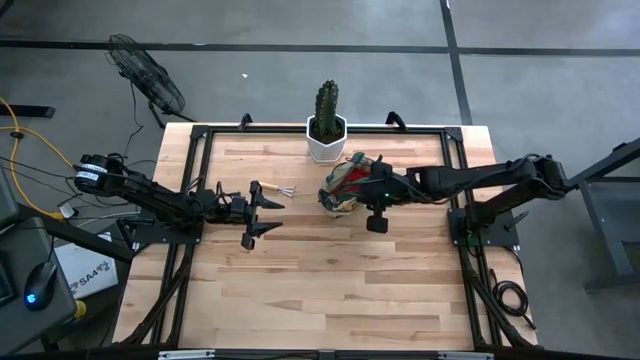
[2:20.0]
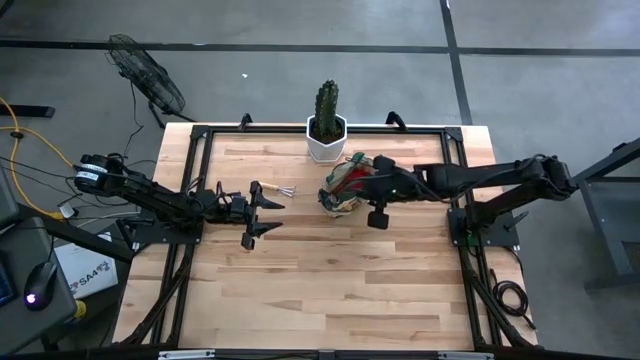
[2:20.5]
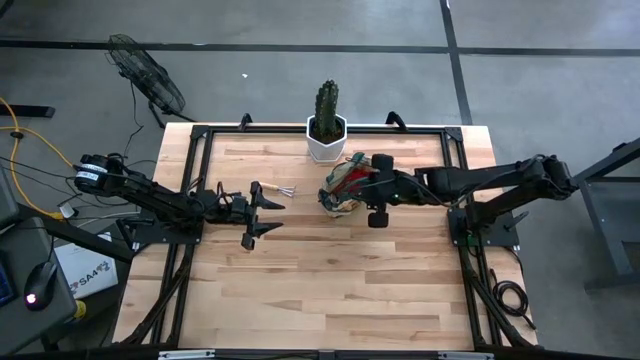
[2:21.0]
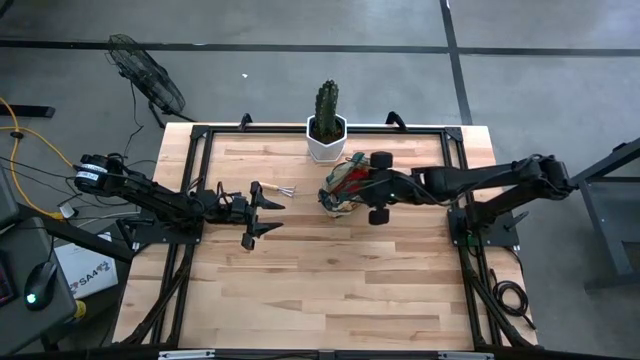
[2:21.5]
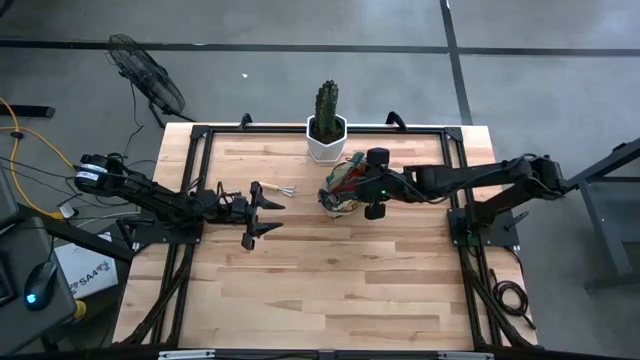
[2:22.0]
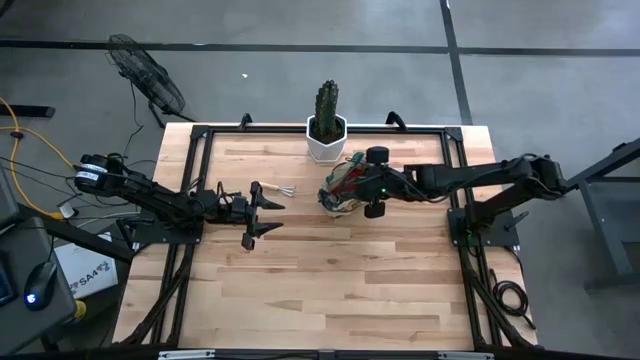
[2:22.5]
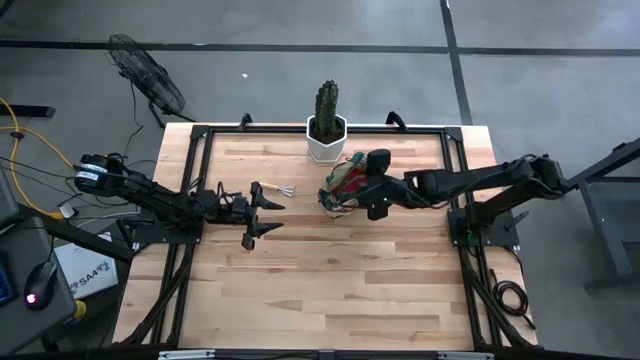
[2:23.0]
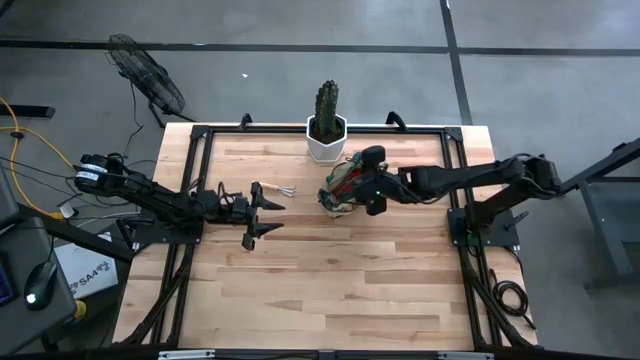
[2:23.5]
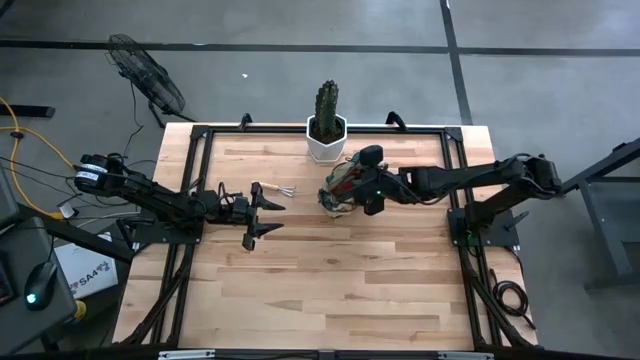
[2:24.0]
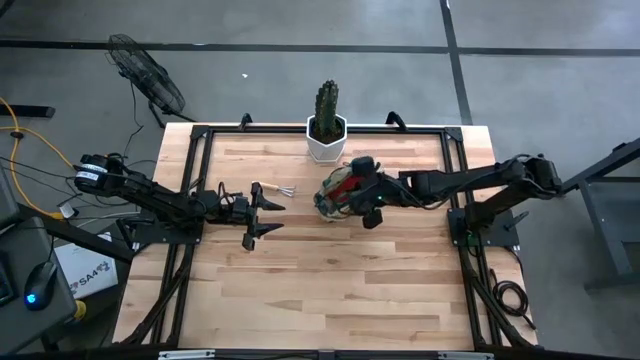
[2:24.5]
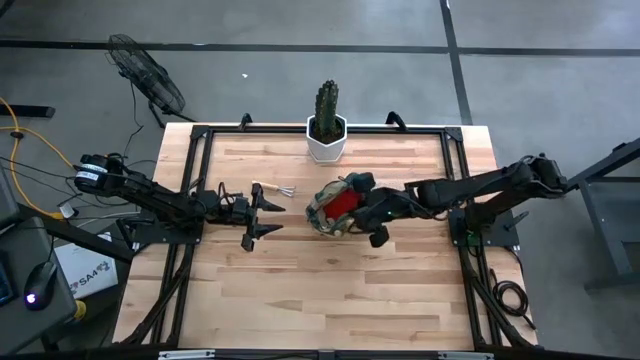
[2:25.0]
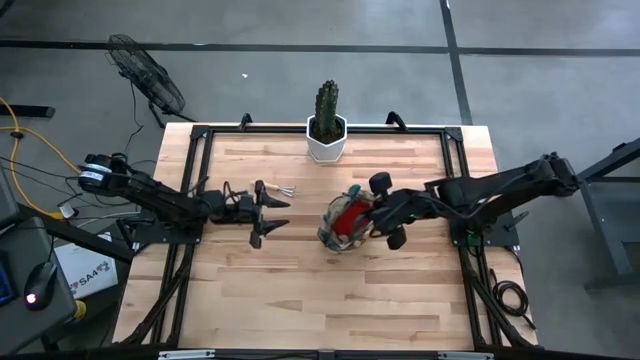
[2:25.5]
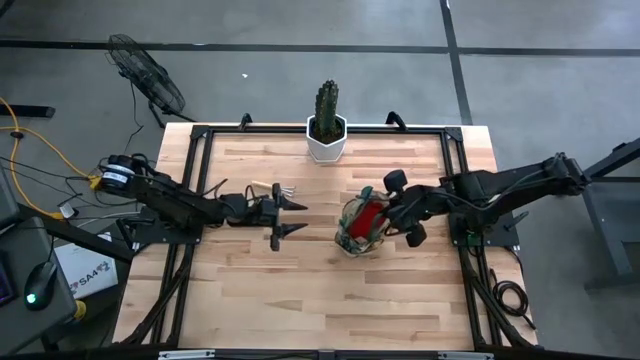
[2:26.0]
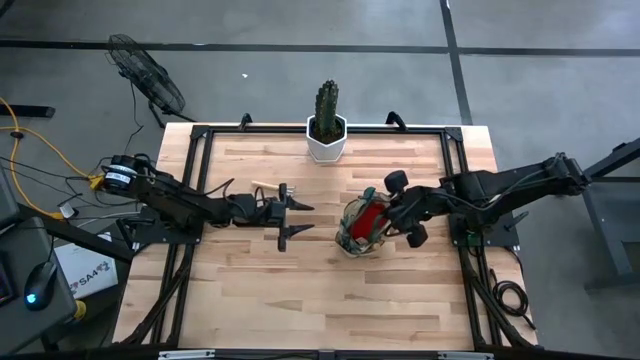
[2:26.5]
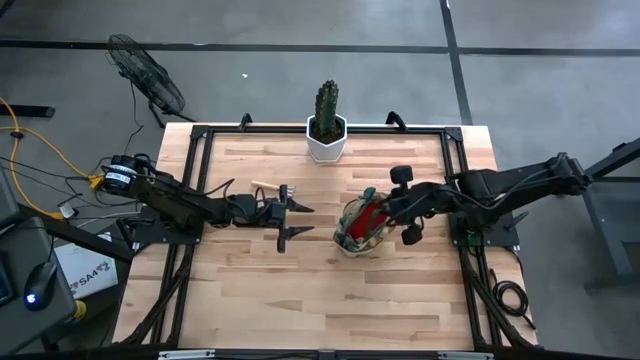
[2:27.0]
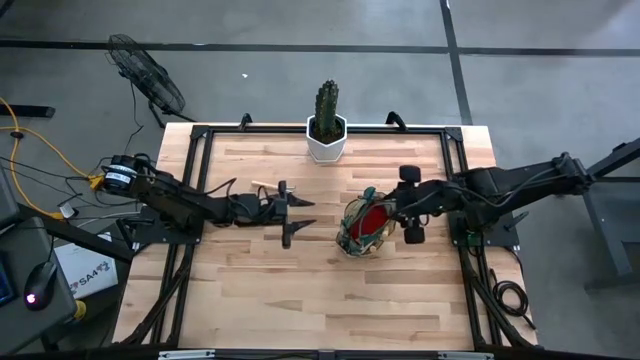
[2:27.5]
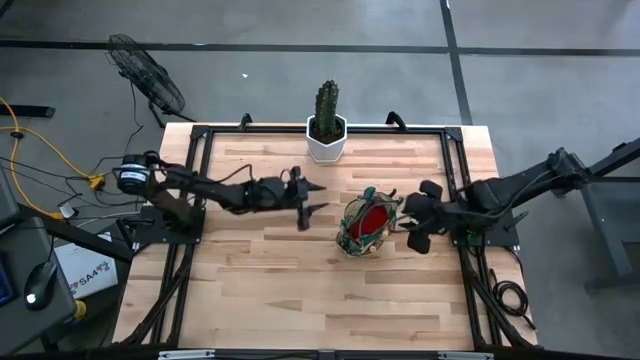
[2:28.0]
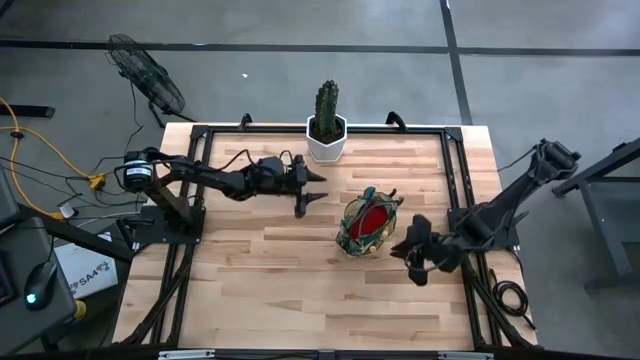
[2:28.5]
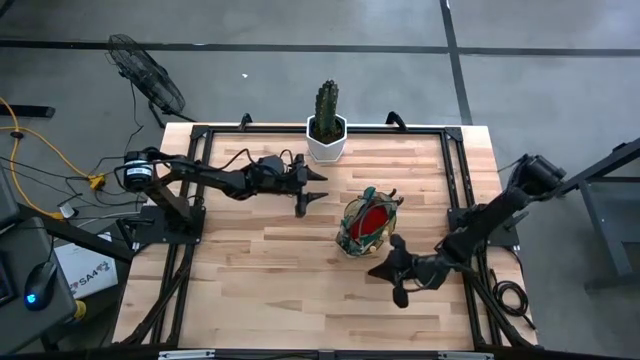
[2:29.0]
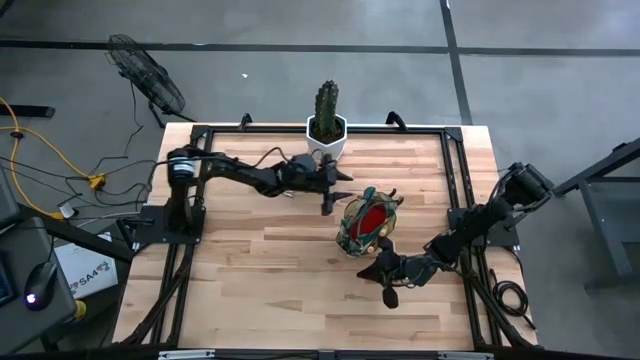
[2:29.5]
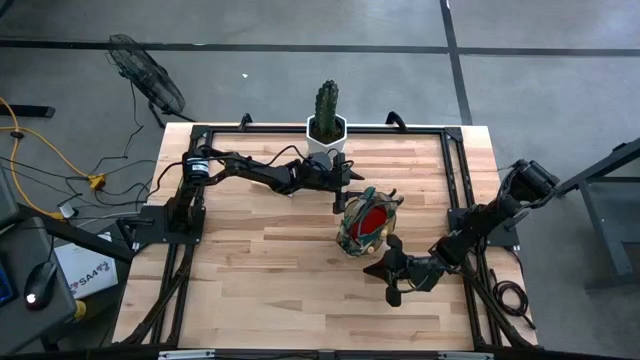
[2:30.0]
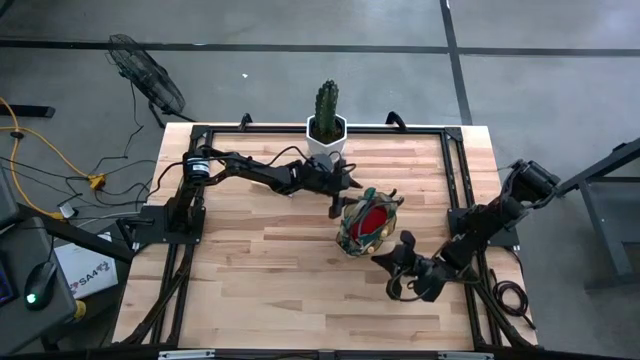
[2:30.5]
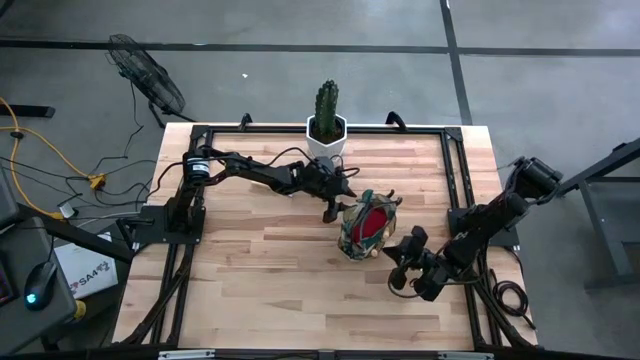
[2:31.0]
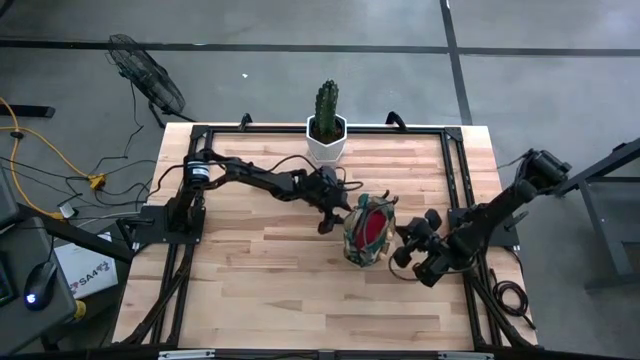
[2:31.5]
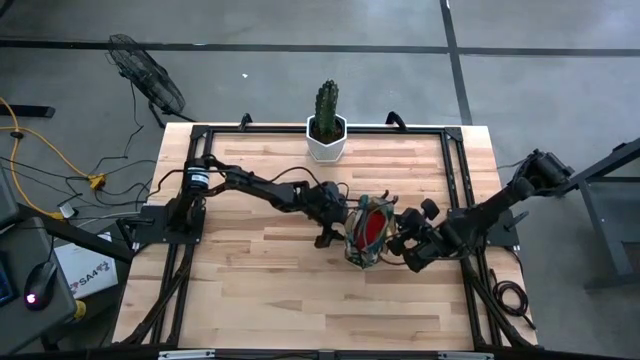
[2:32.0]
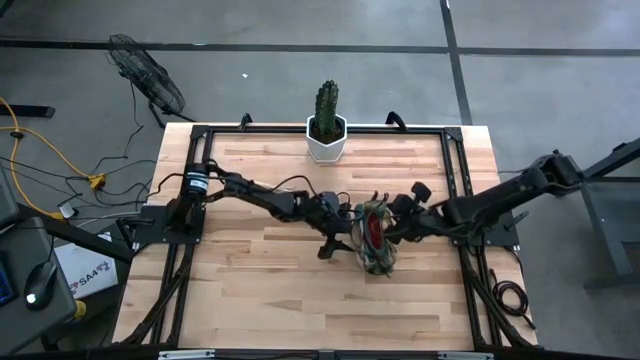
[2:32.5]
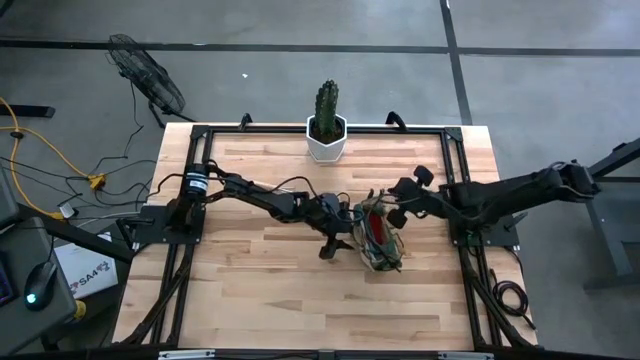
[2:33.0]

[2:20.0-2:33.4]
Task: Pick & Place Garden tools in Gardening bag
Adjust the brown gardening bag

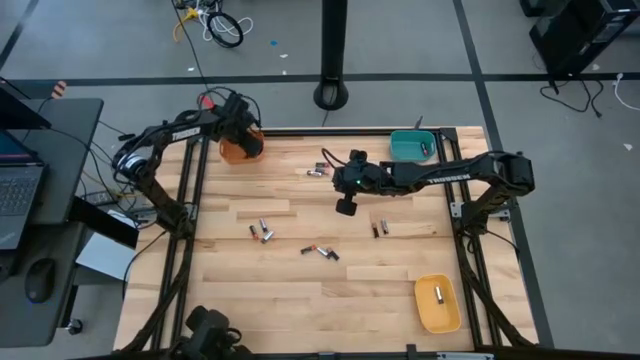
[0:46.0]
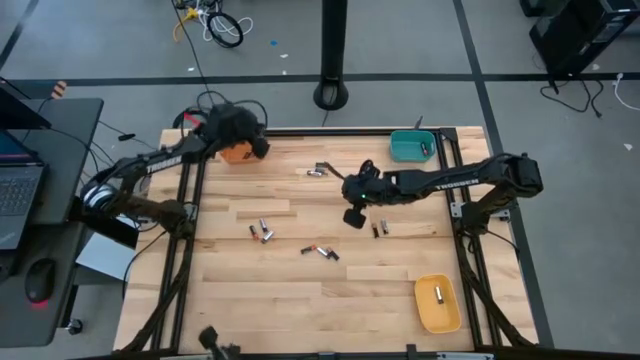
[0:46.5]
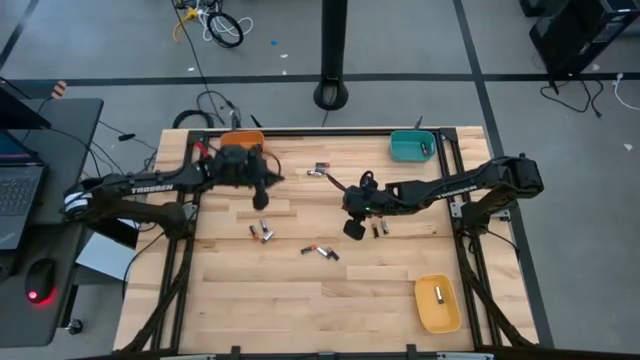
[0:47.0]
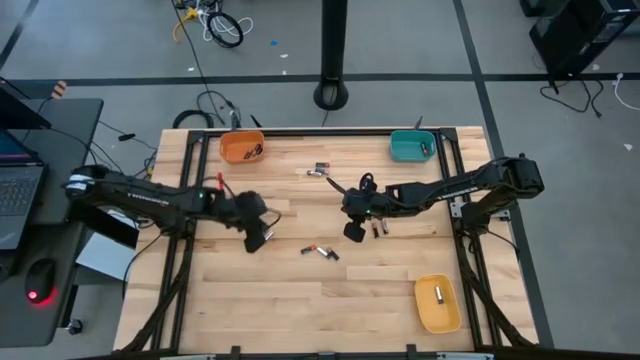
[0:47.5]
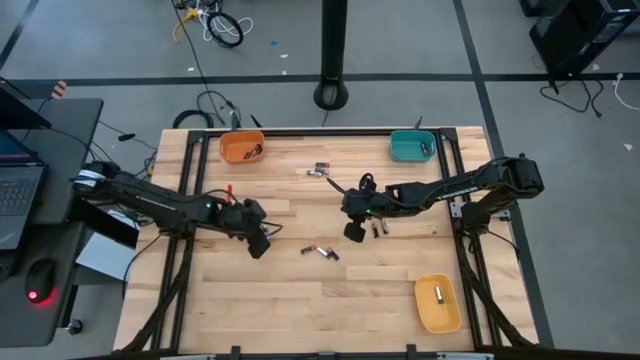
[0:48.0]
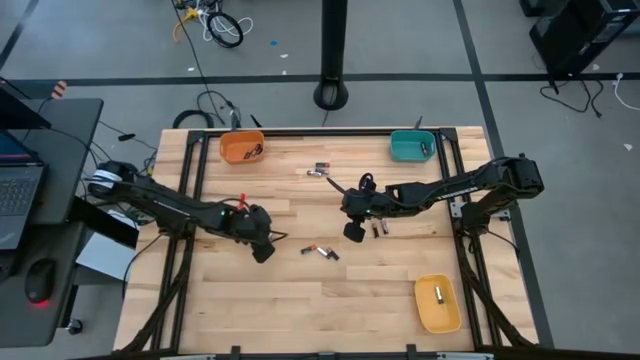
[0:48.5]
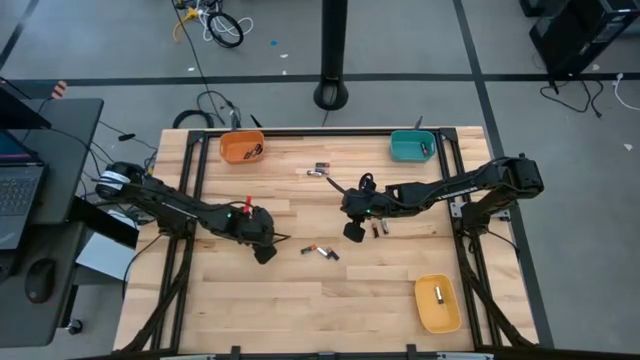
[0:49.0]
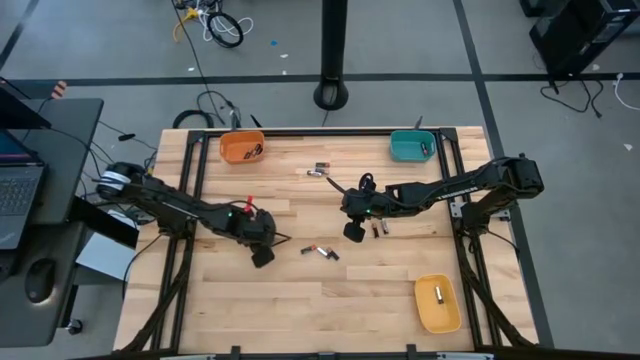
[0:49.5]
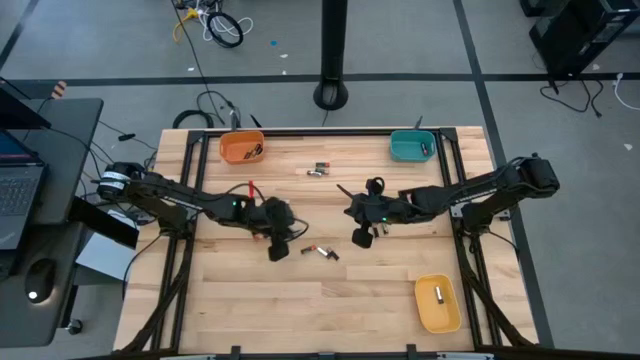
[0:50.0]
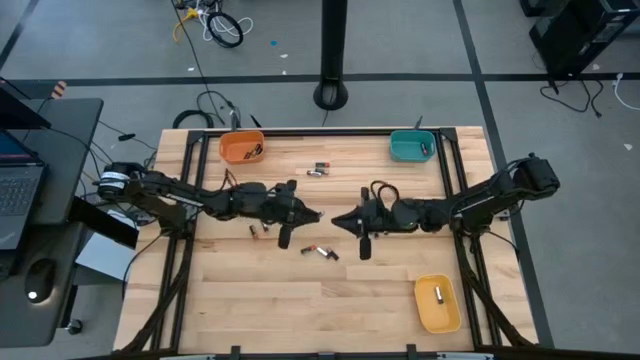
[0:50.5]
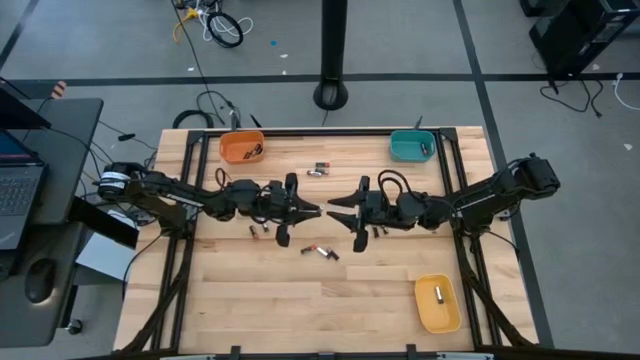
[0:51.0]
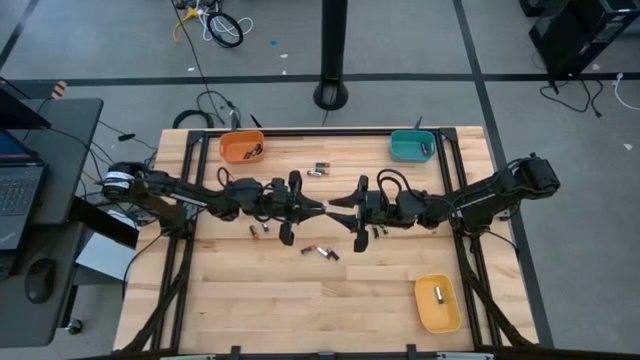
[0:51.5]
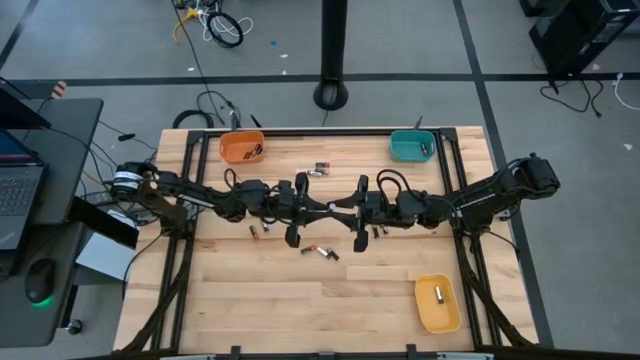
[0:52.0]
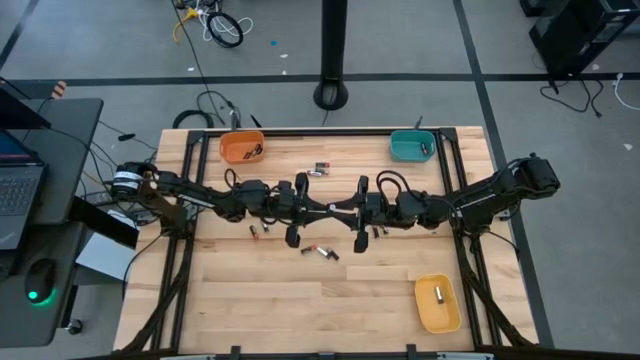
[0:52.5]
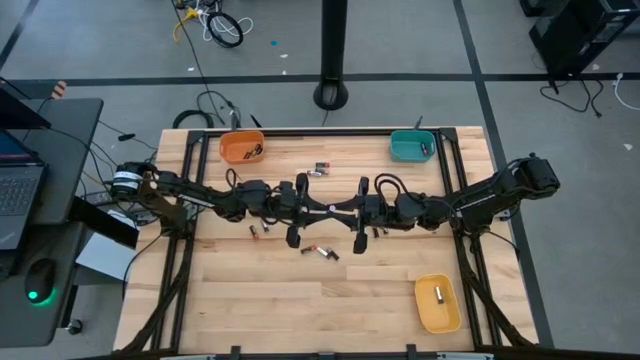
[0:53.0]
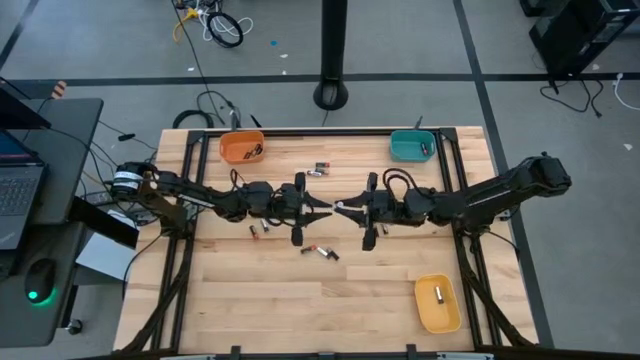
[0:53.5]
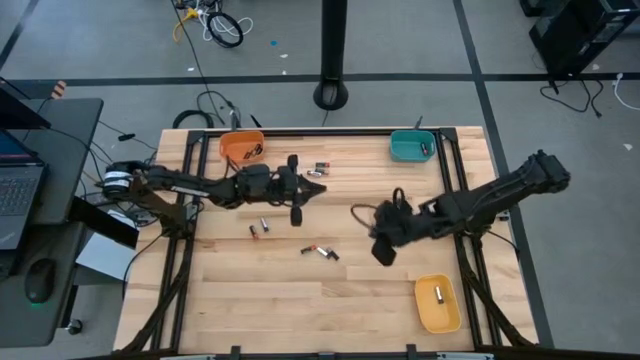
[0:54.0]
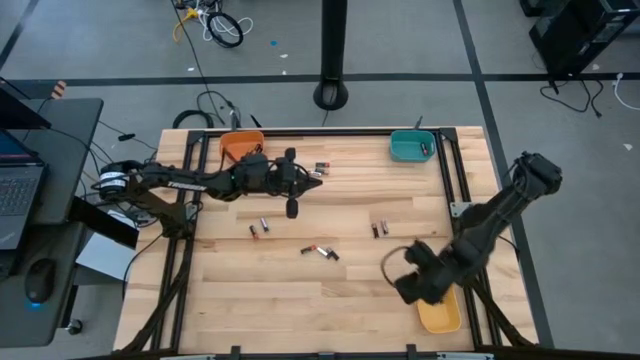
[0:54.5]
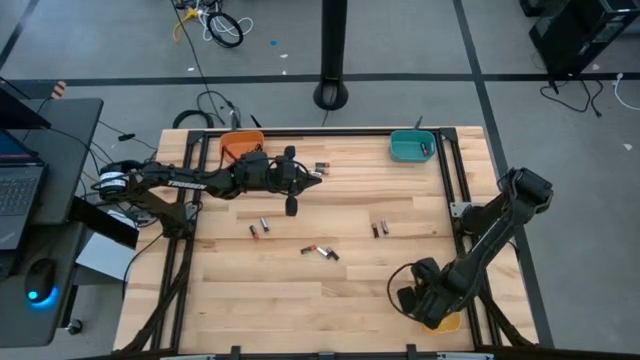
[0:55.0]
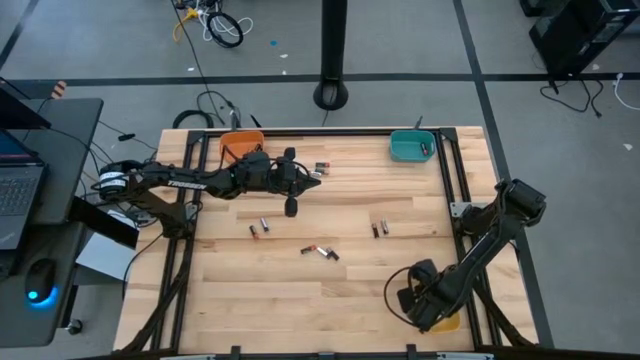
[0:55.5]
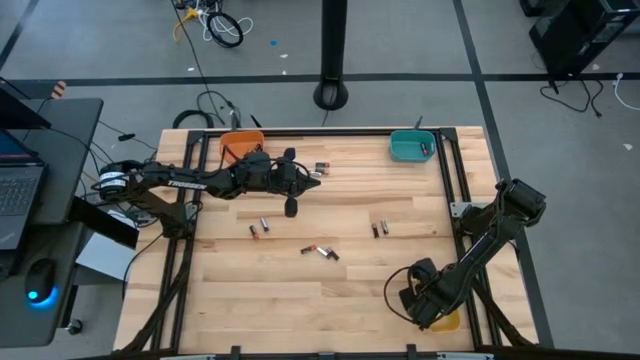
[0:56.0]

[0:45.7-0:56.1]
Task: Sort batteries
Put the silver battery into the yellow bin
